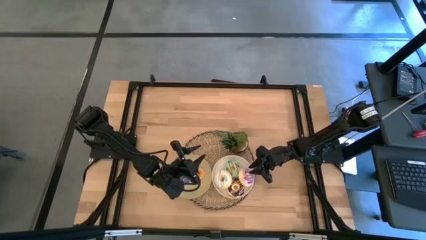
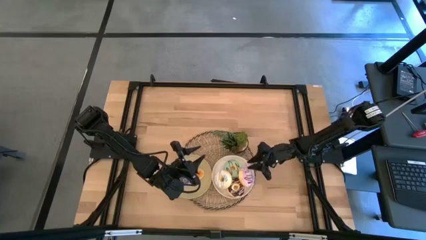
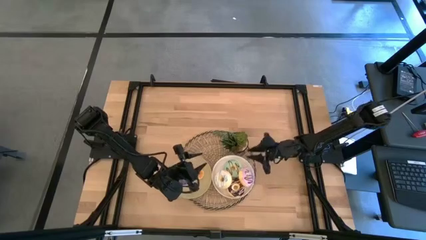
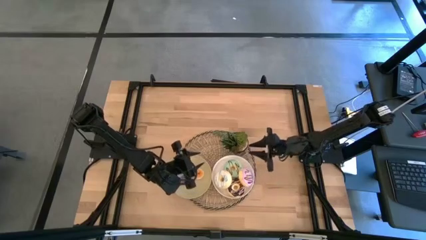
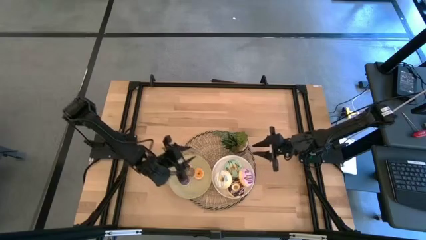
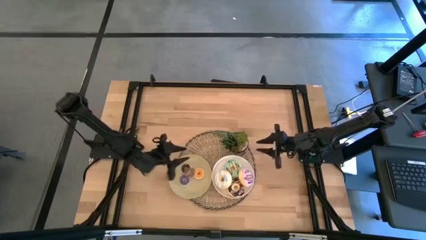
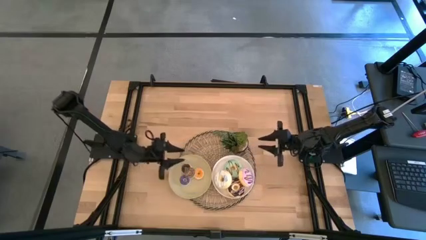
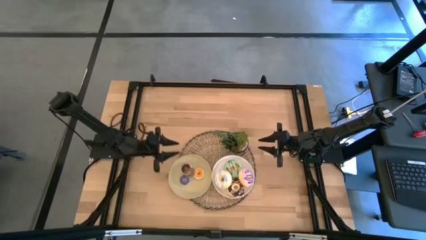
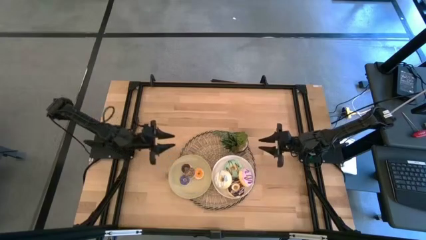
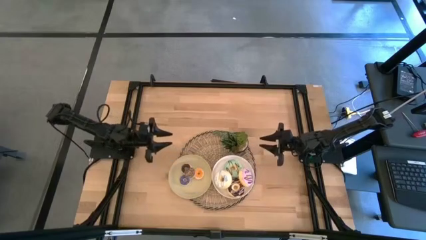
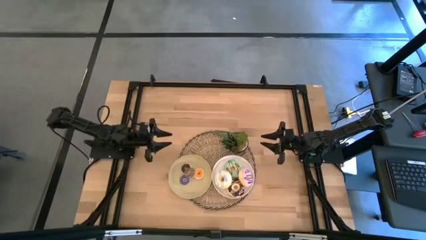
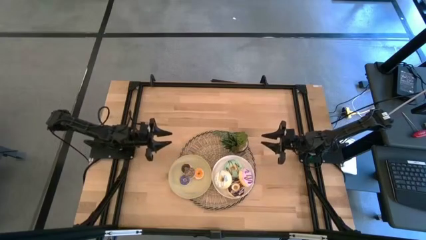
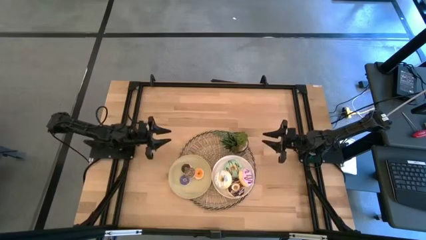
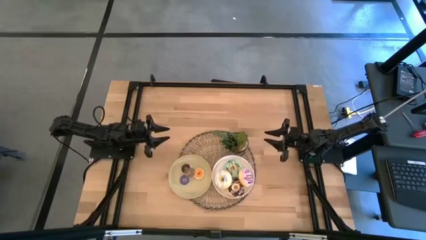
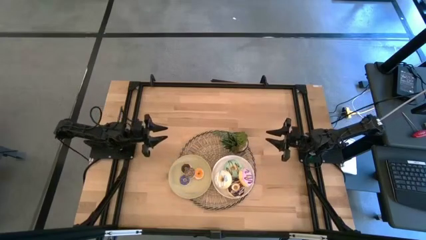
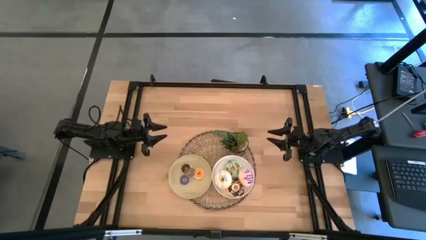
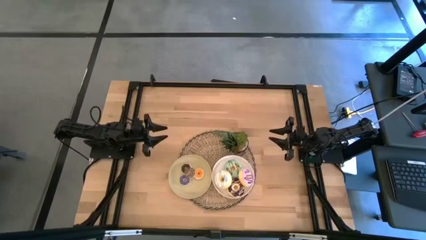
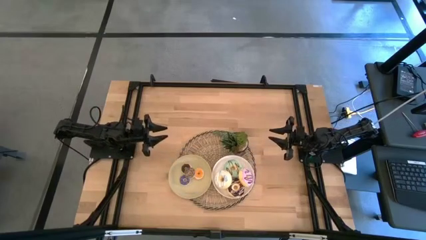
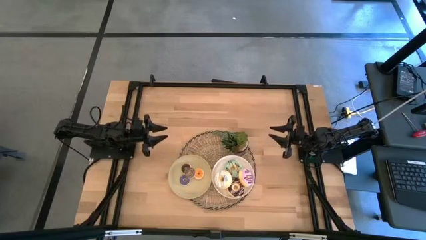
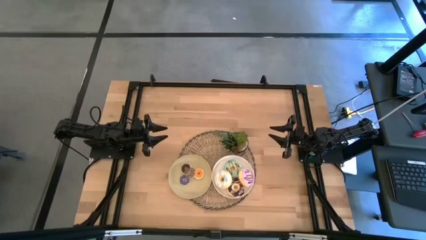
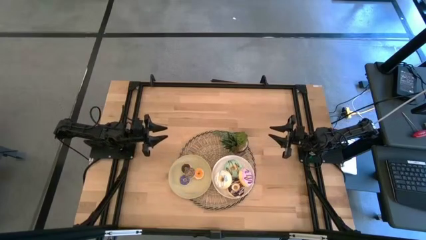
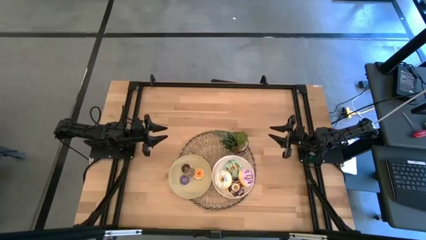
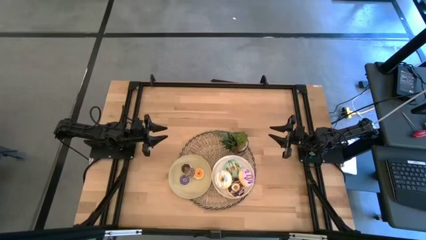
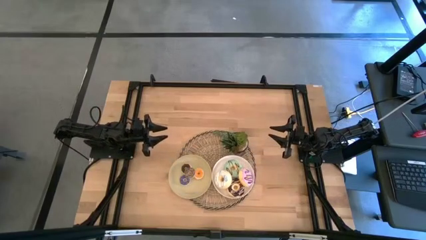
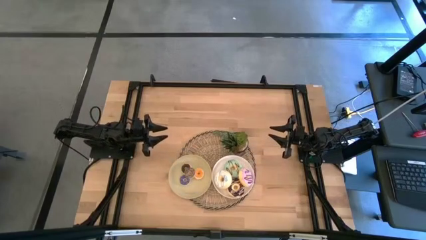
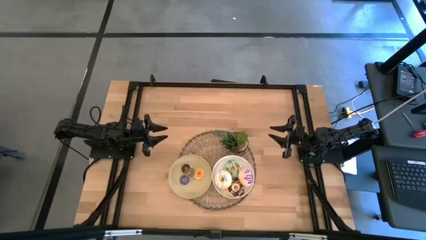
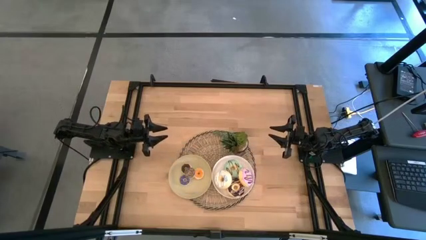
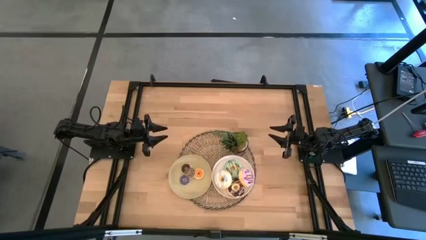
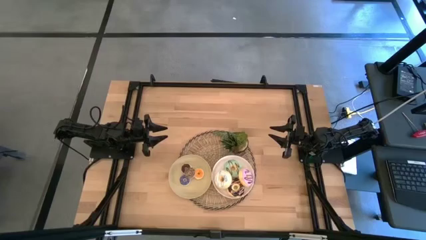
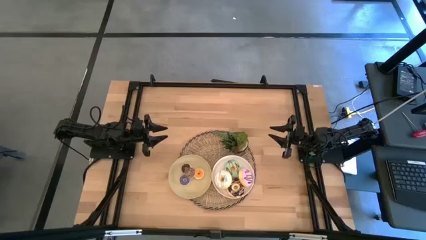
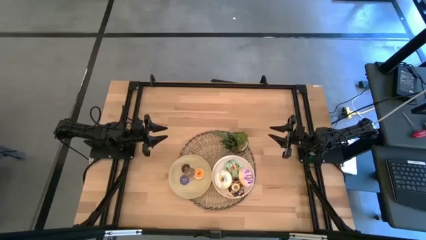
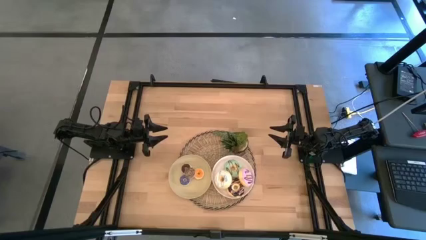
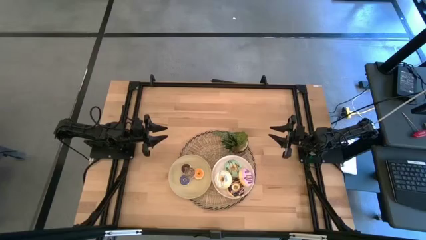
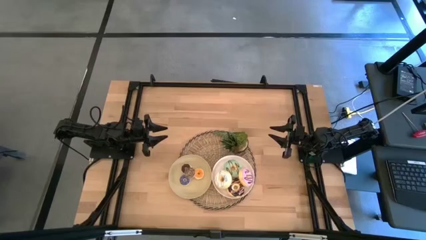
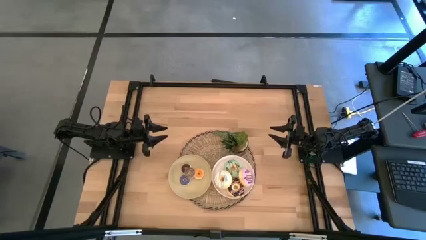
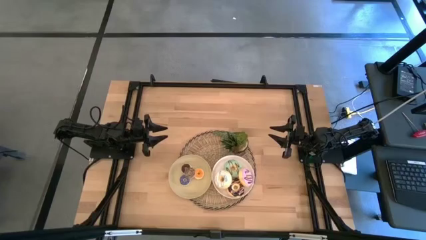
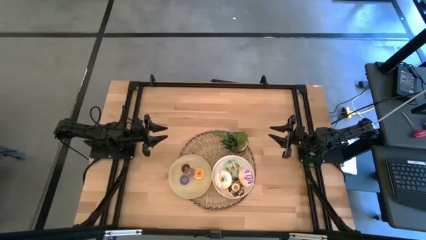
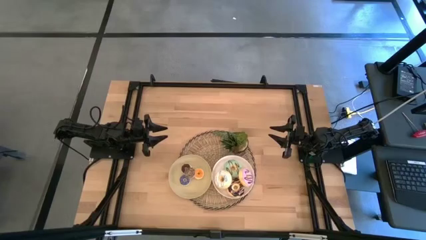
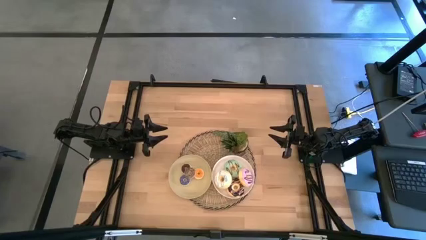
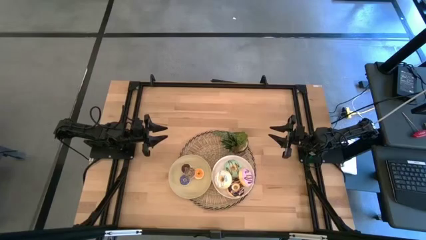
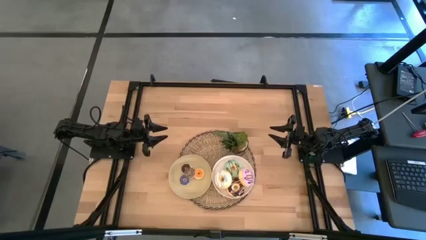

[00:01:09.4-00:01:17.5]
Task: Pick & Place donuts
Return to Home Position

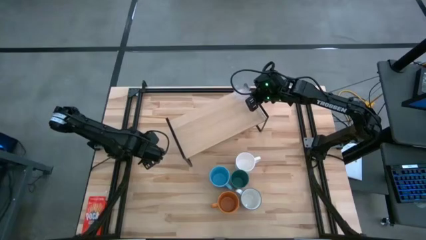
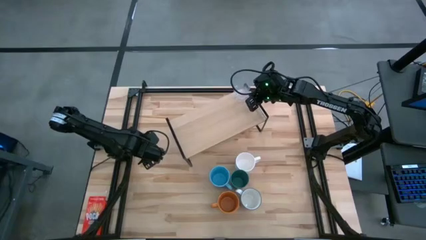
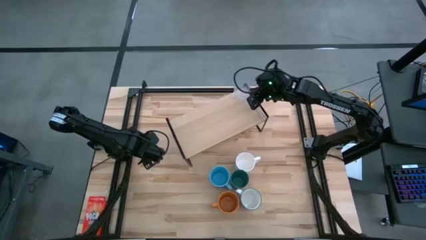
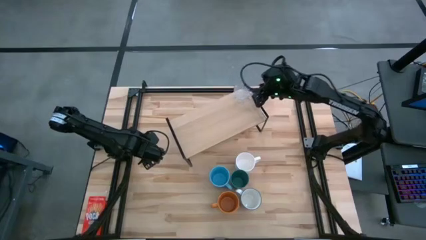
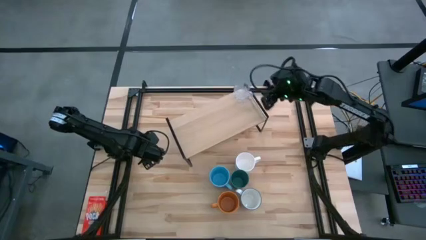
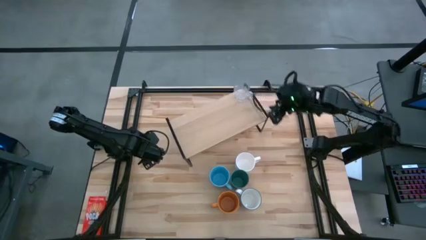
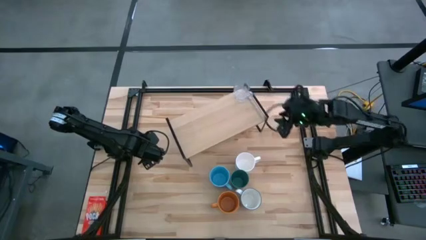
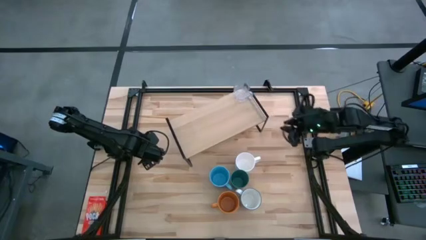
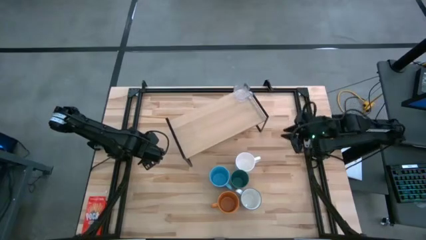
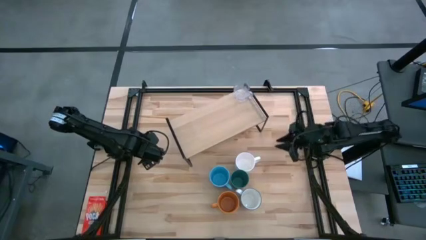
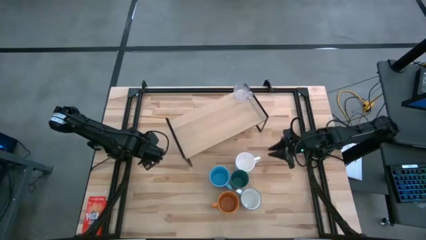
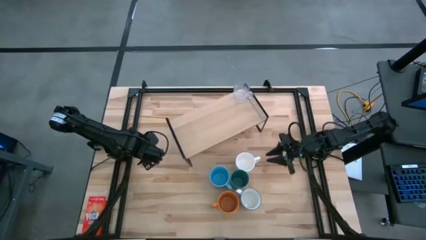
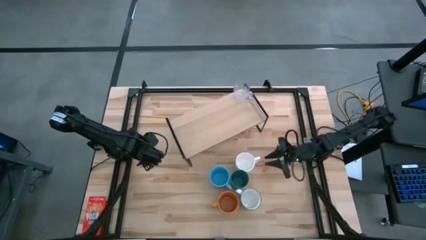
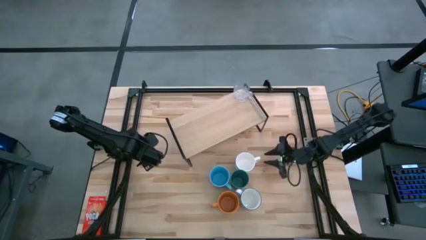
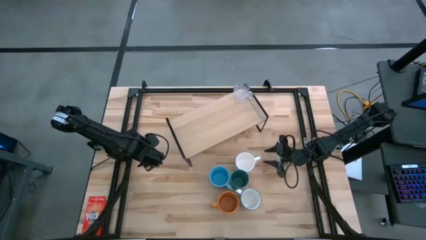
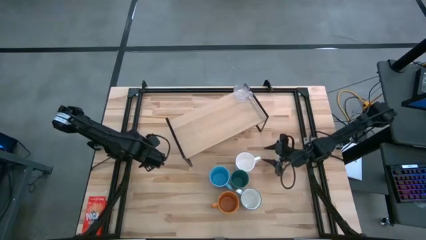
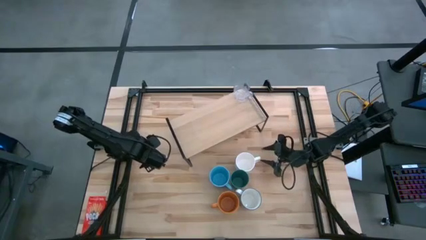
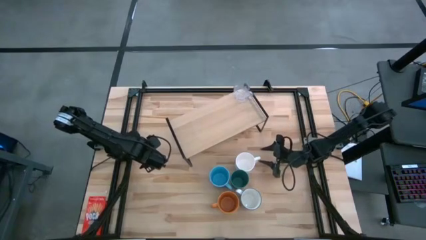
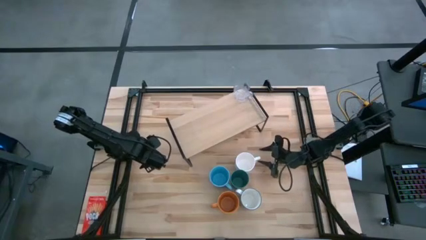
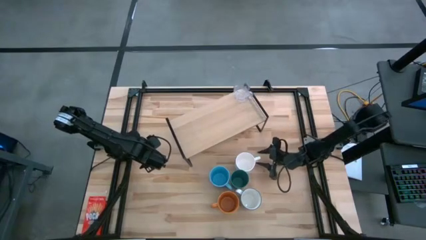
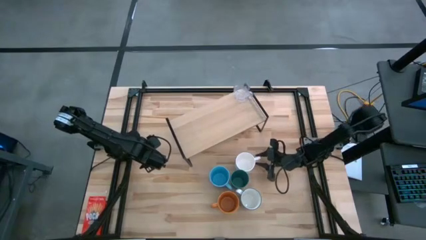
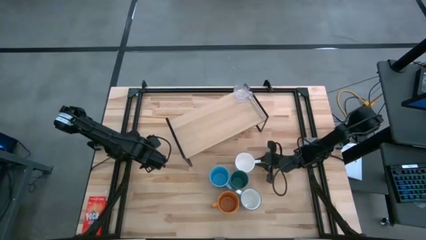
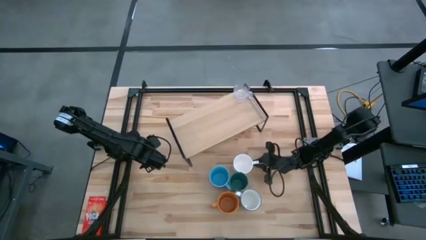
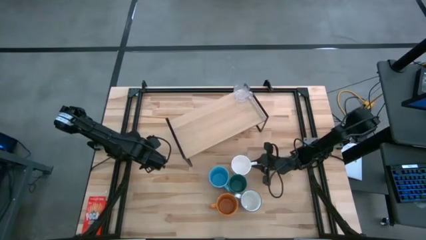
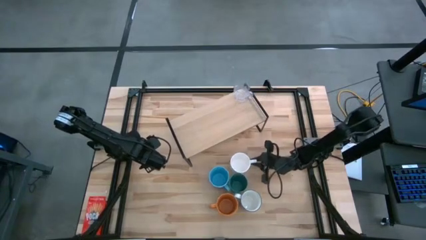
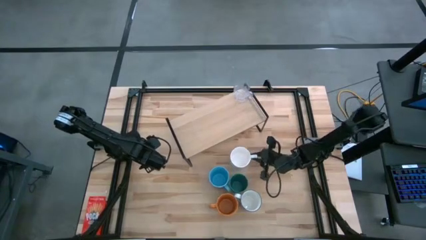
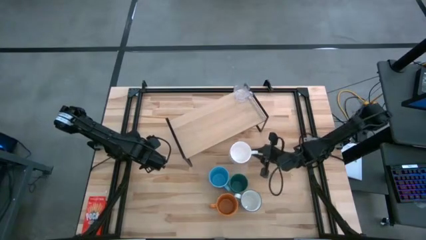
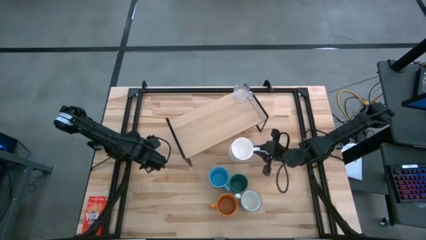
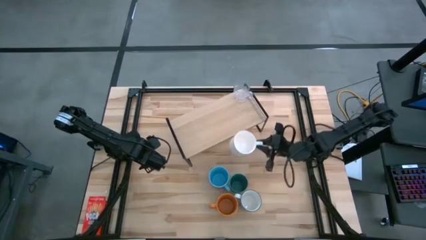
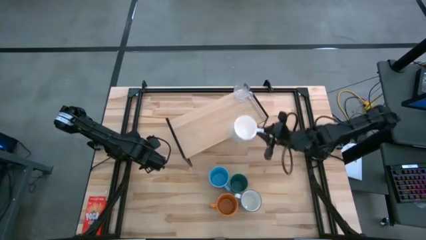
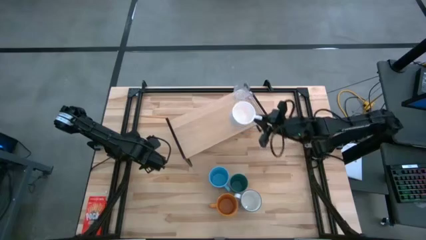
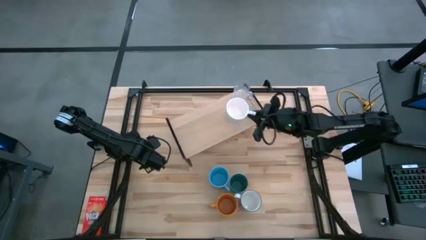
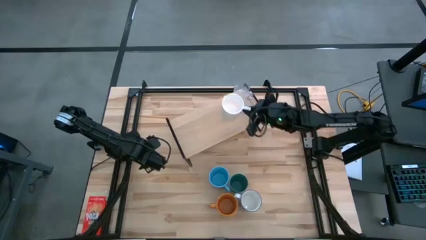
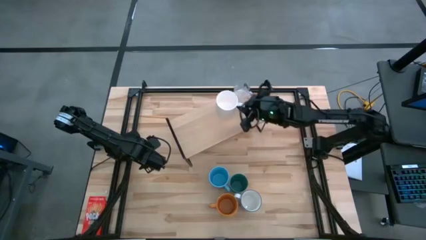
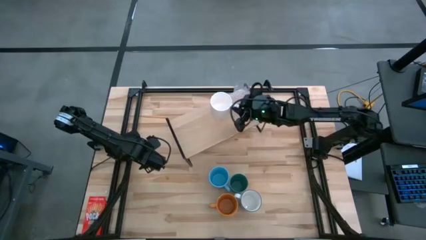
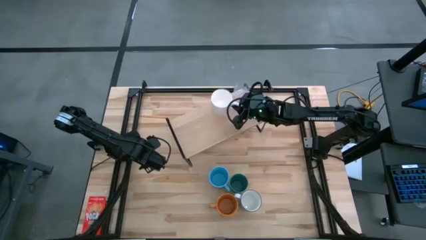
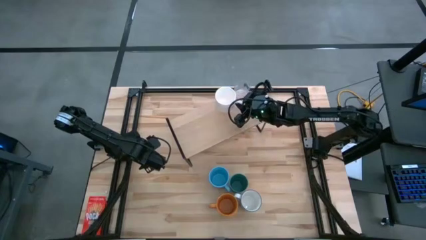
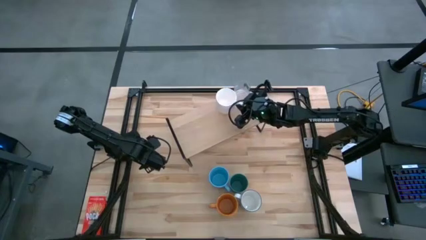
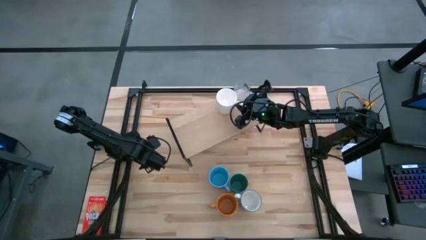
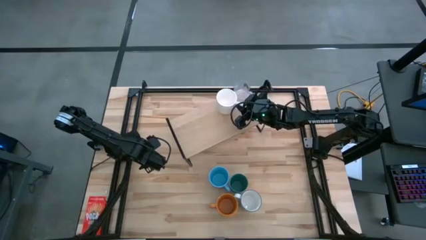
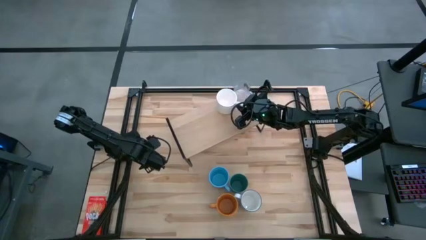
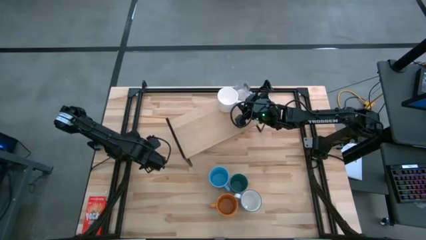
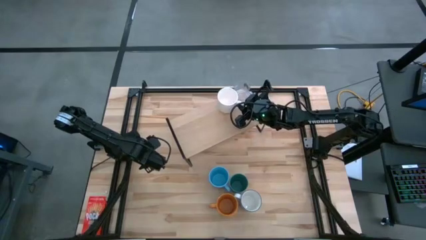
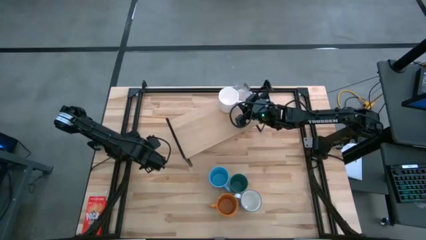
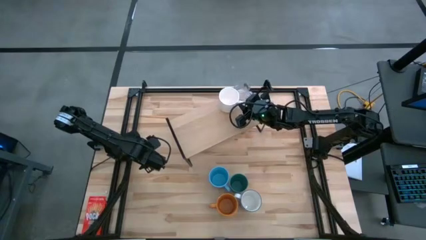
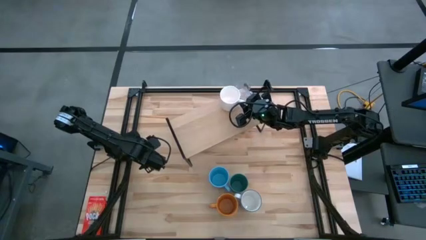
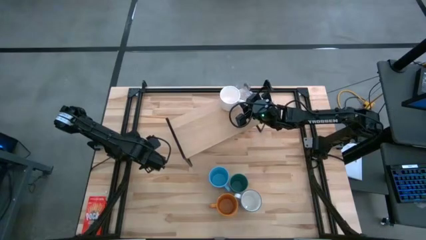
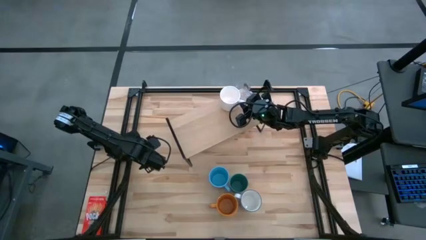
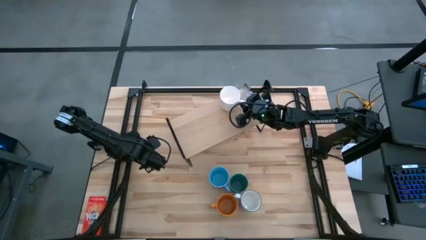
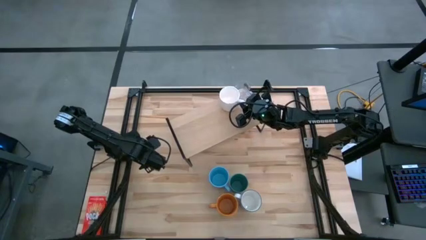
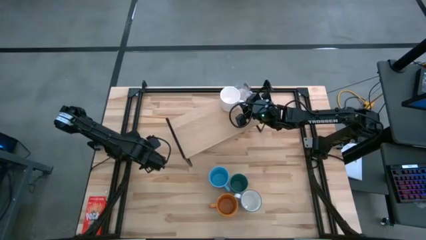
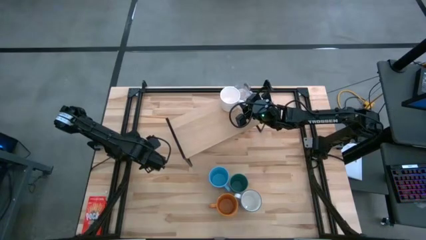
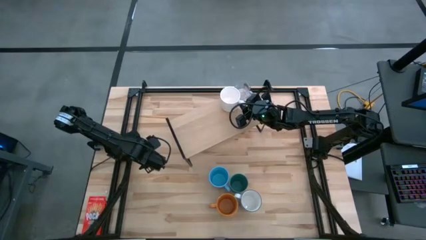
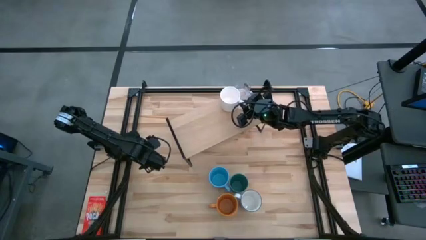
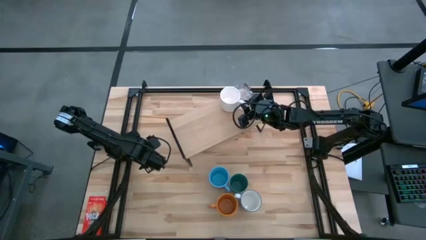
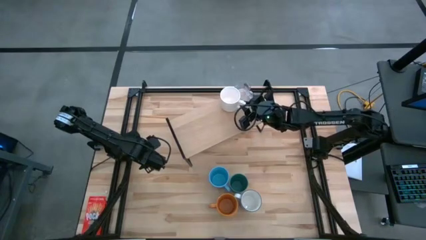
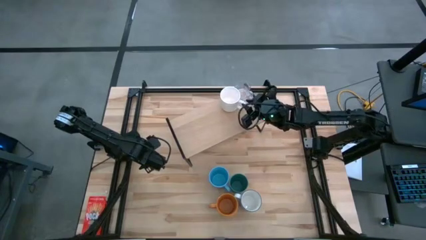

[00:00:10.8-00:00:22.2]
Task: Stack small to large cups/mugs on shelf
Put the white mug on the shelf
